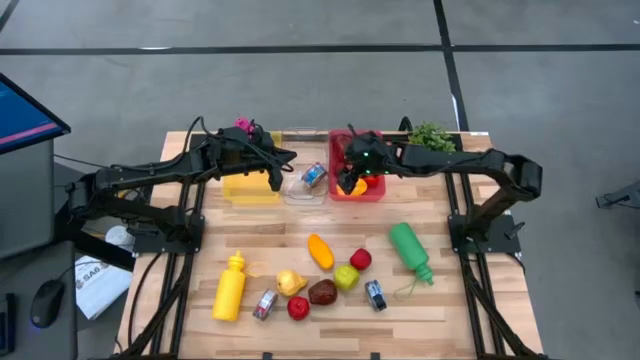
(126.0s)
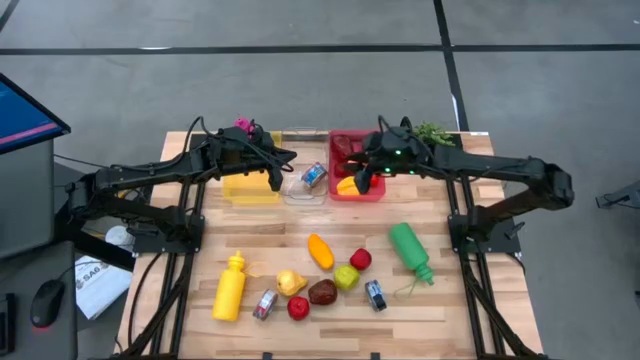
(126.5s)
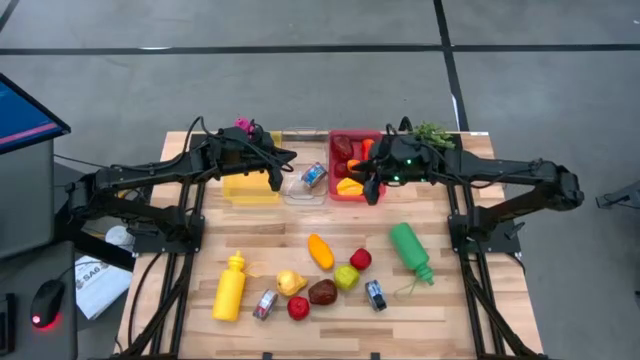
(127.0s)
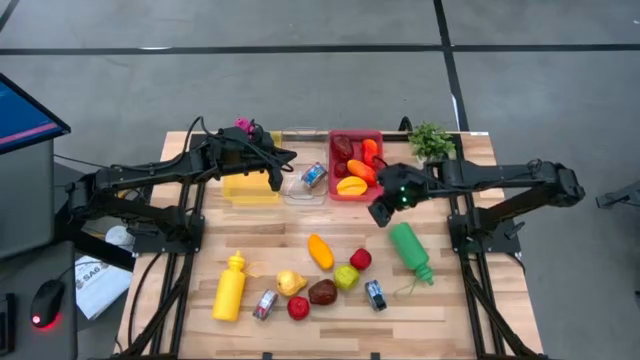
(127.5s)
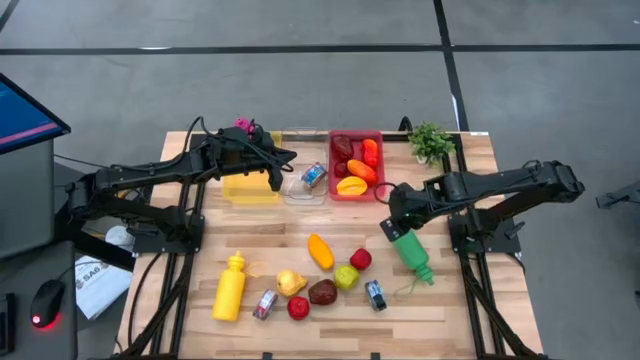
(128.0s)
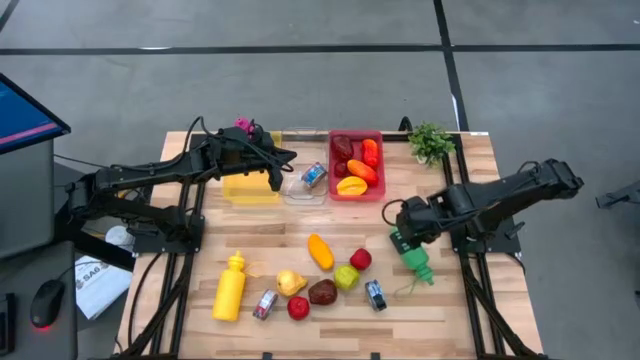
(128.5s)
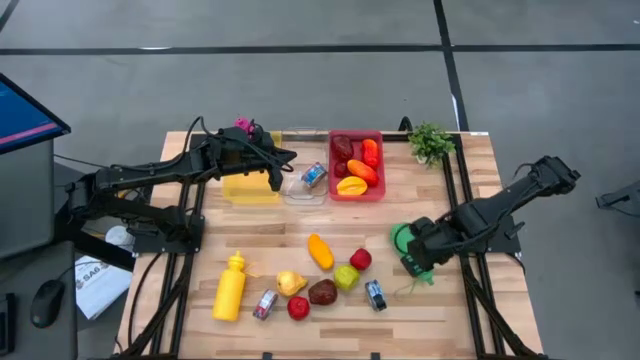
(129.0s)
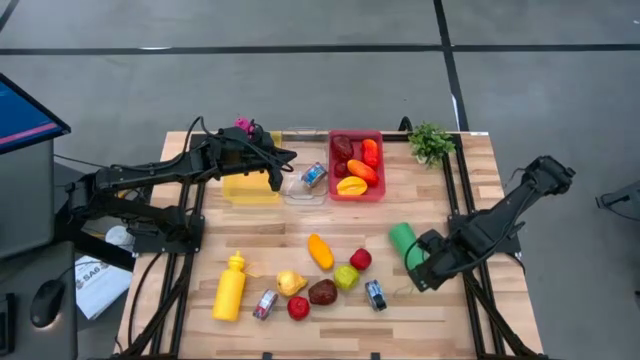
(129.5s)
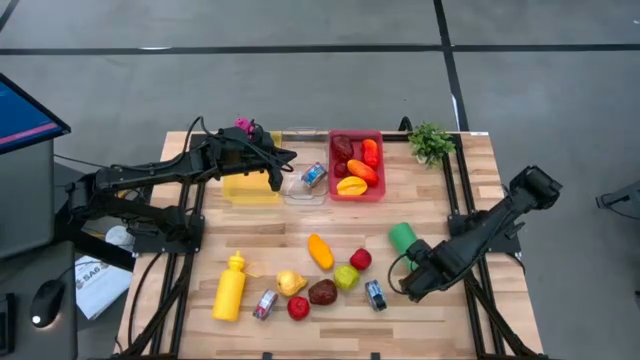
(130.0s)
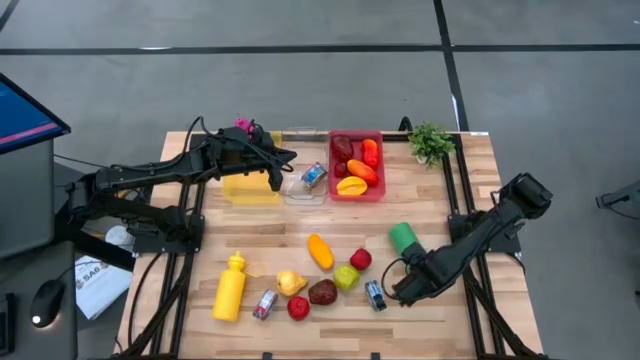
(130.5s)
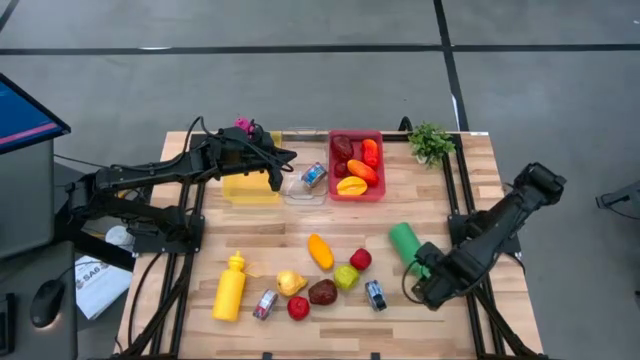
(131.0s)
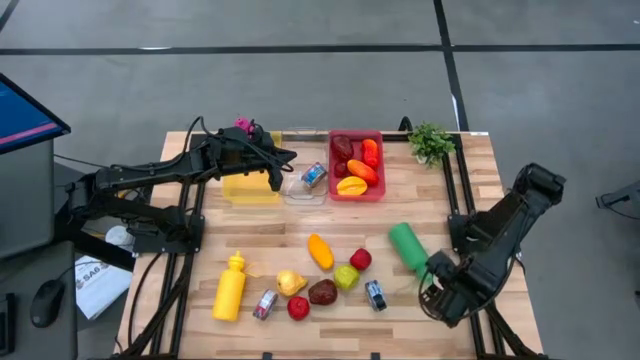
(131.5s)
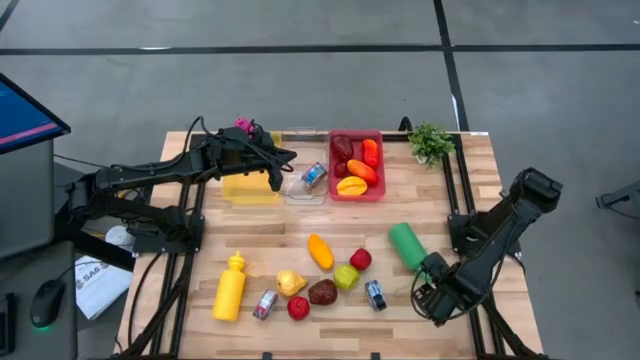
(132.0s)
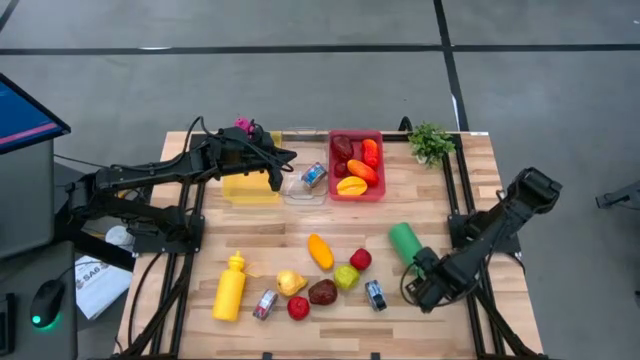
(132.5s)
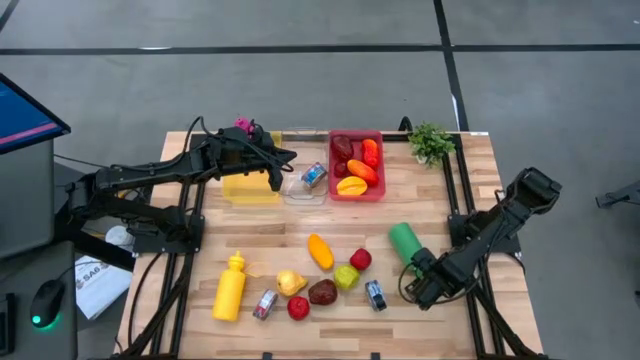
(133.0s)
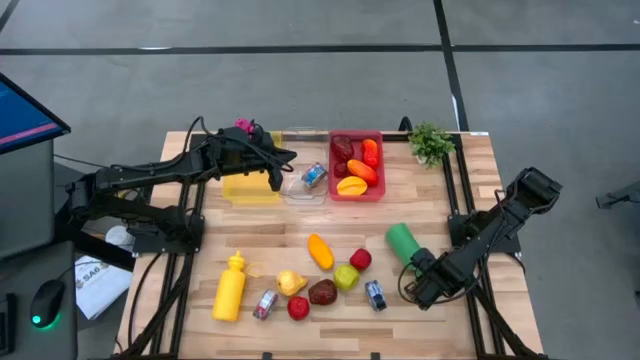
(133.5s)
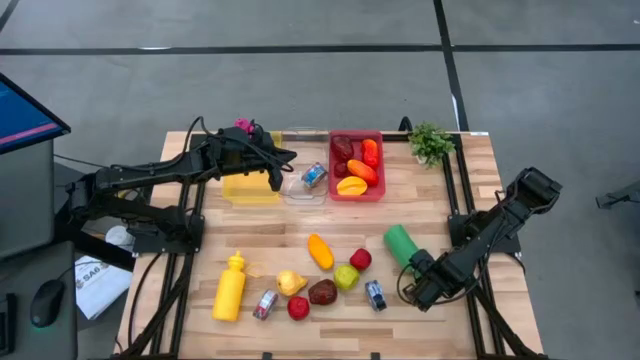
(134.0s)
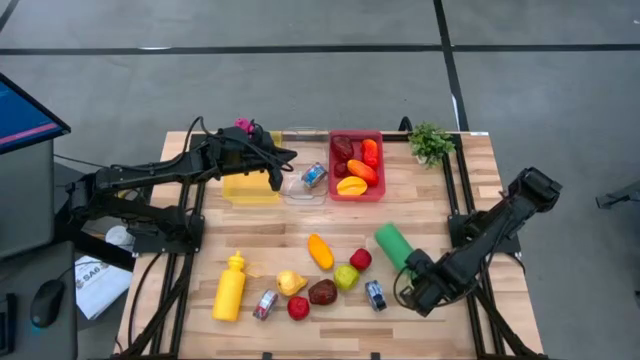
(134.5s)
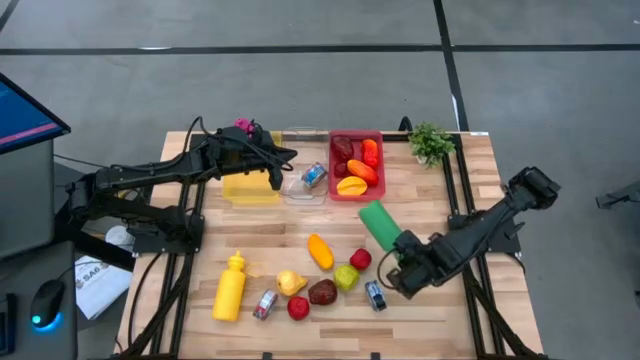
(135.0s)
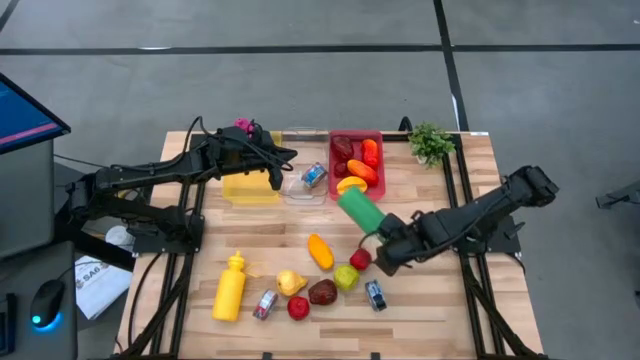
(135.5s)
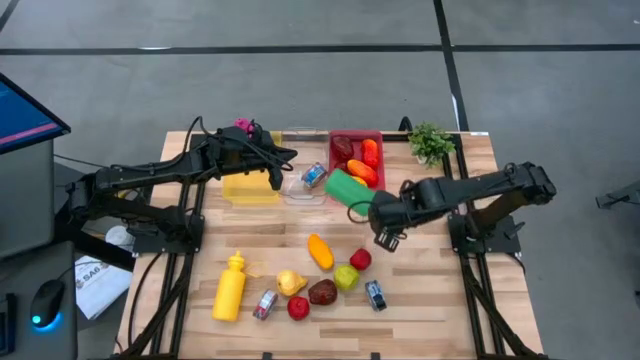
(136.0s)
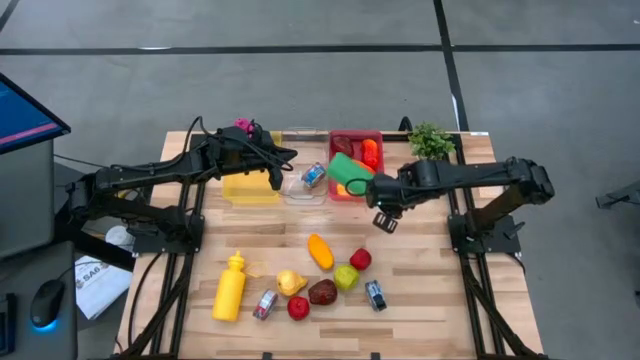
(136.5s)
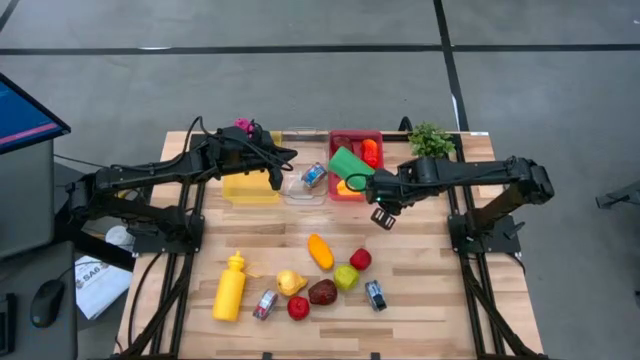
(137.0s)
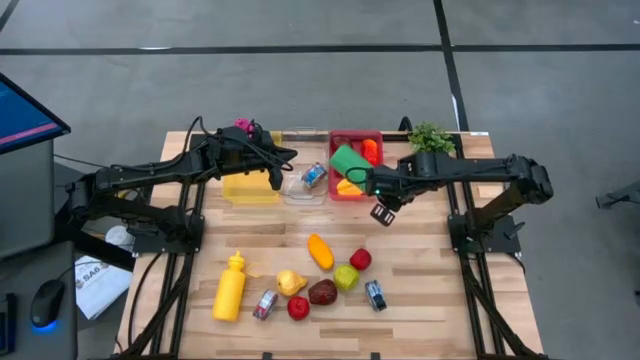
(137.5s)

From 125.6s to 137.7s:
Task: Pick & Place Food Item
Put the green tumbler into the yellow bin

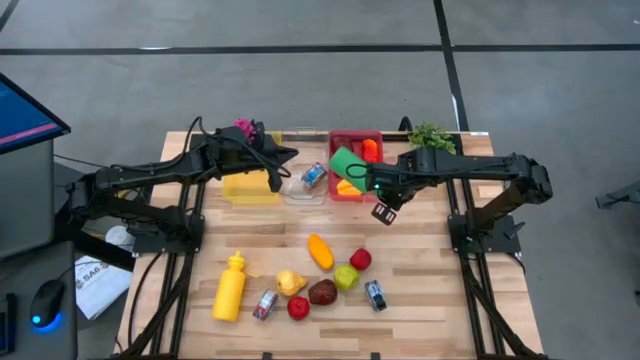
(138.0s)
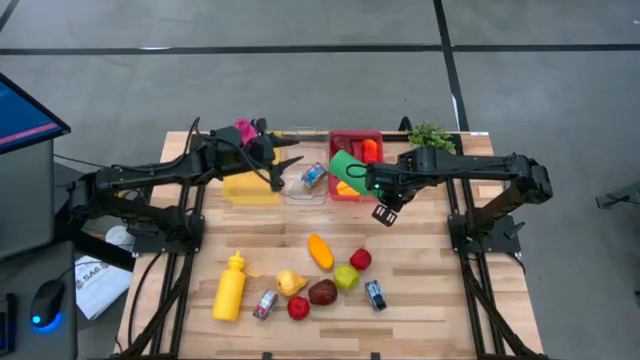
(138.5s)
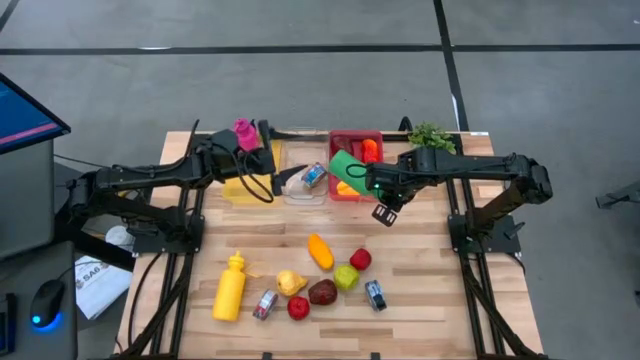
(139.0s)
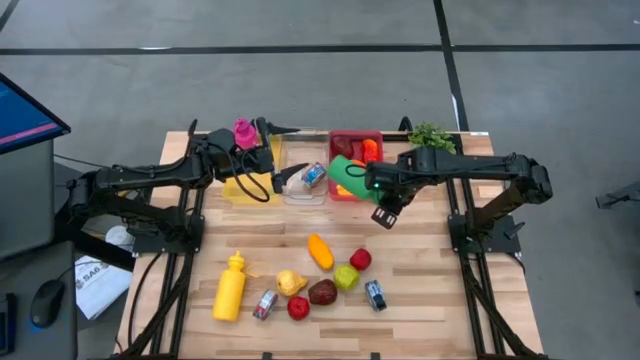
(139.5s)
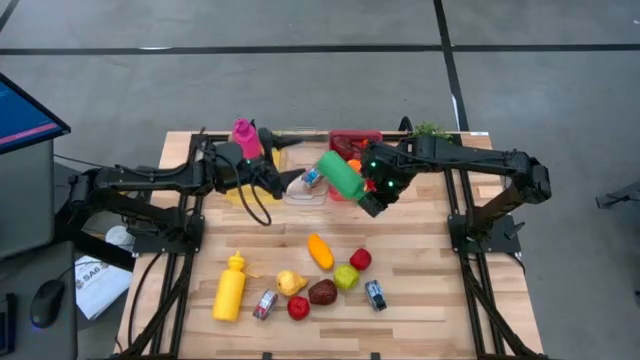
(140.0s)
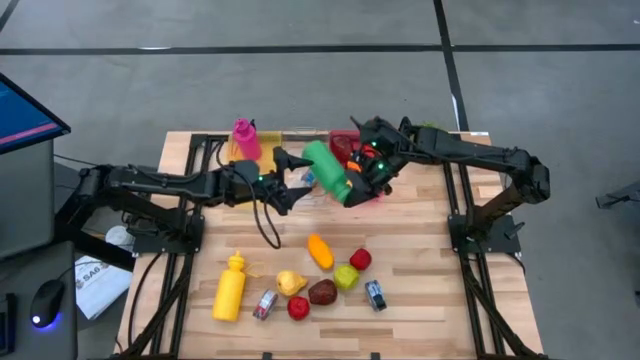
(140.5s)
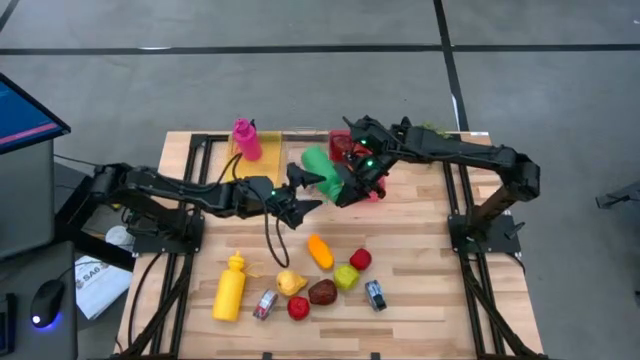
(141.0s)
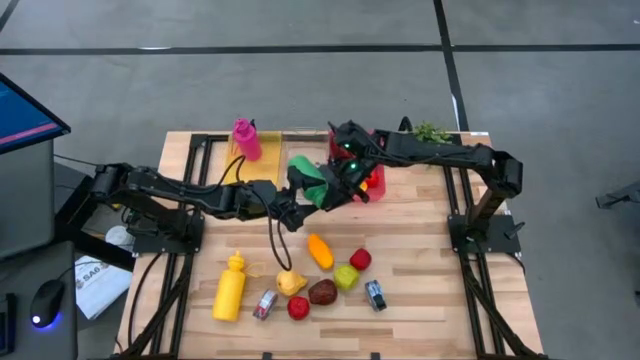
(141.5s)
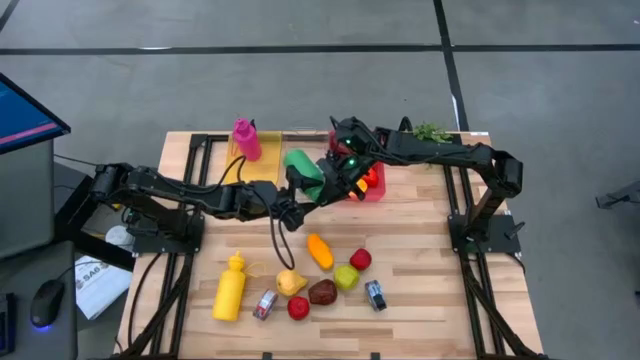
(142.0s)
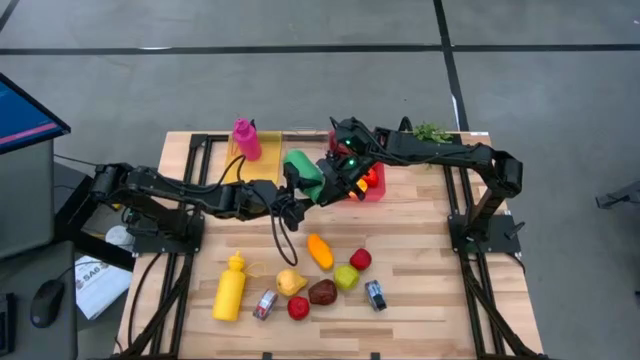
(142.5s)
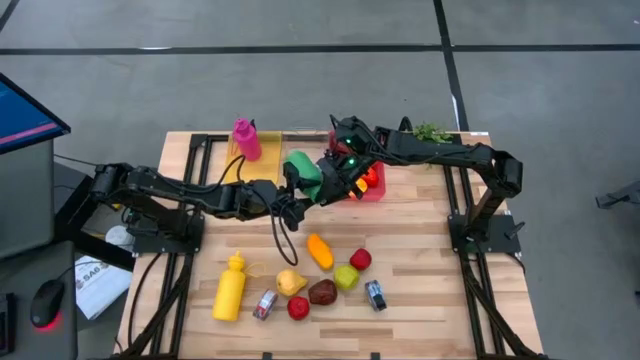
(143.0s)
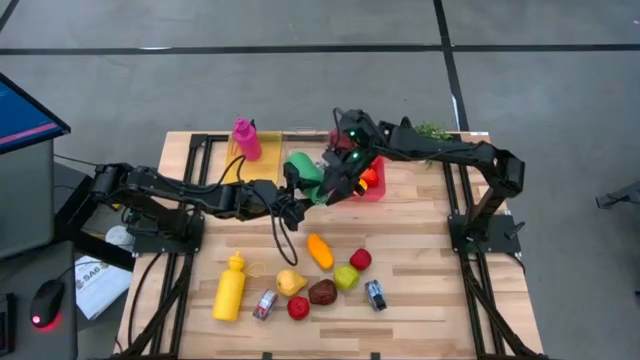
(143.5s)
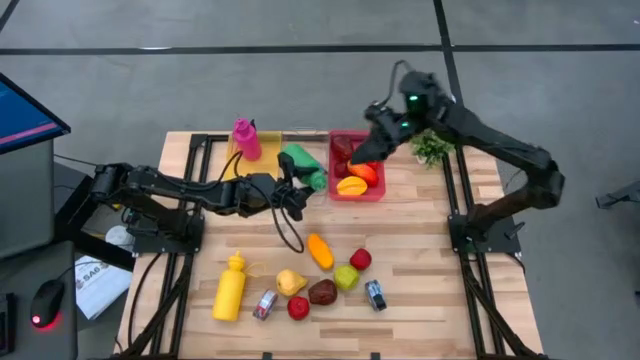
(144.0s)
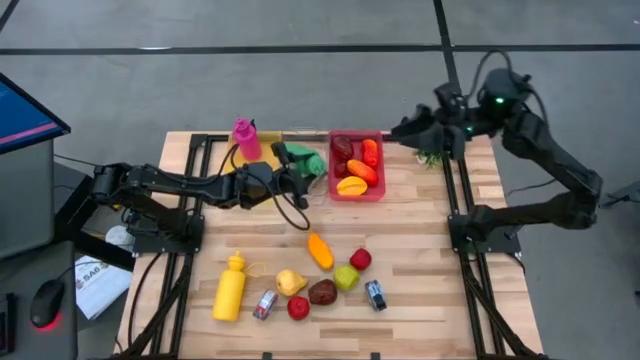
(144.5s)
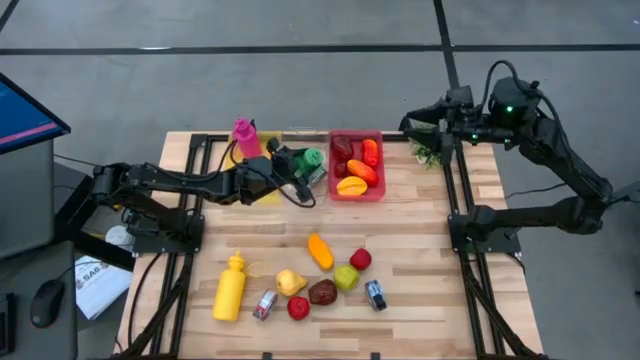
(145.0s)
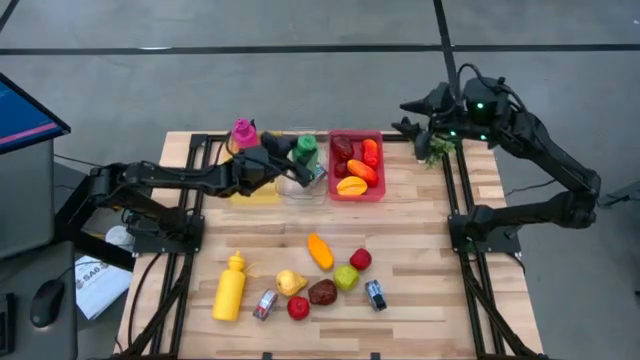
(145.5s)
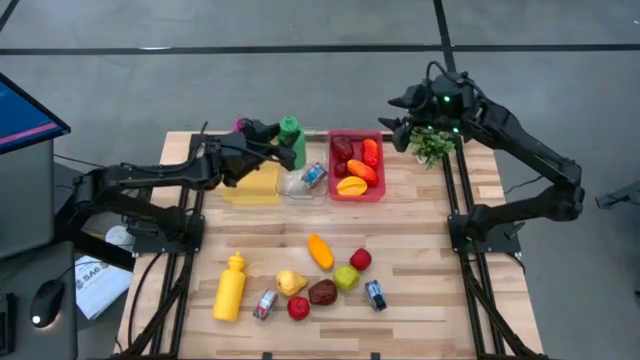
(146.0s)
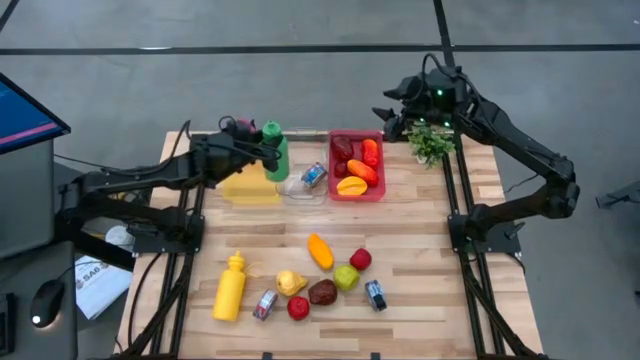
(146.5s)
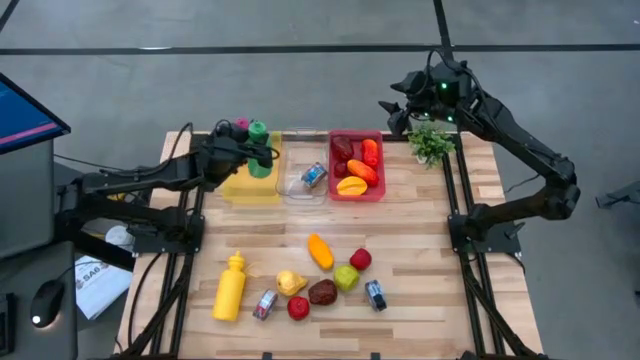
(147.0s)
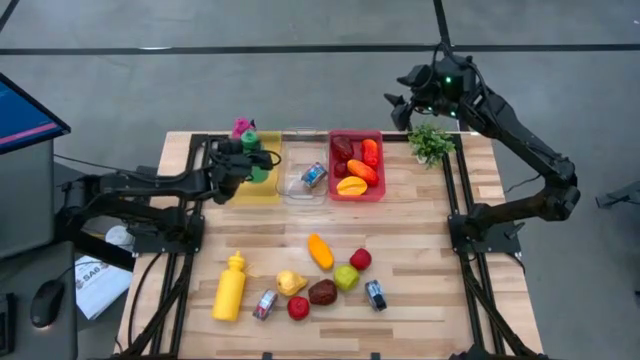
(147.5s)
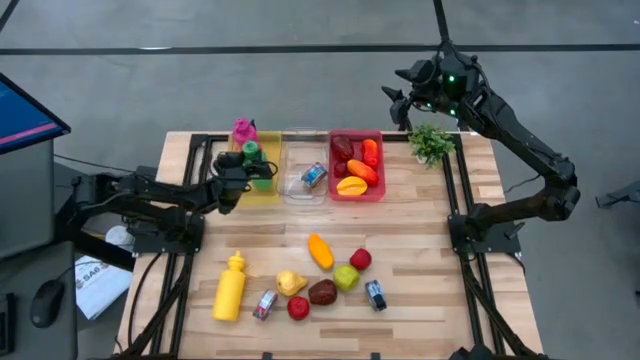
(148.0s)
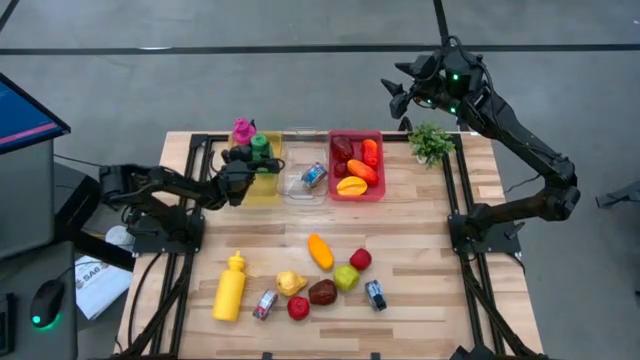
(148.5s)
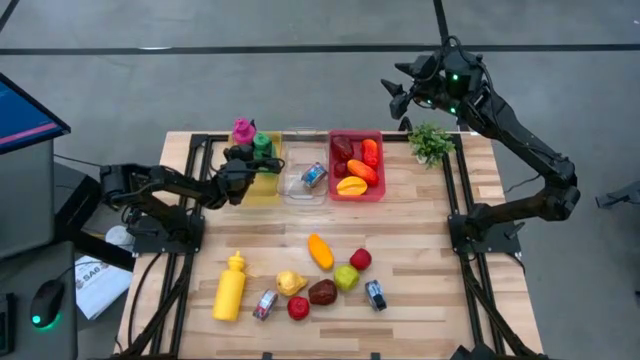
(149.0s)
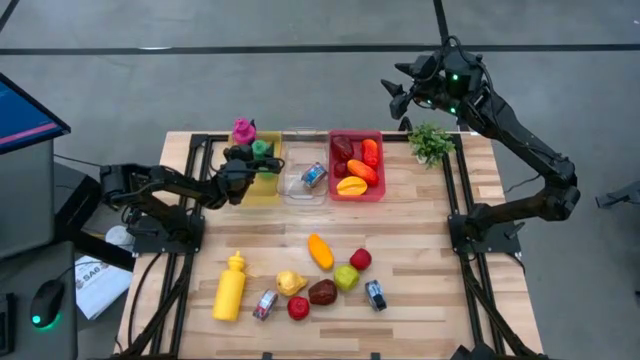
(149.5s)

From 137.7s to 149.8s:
Put the green tumbler into the yellow bin
